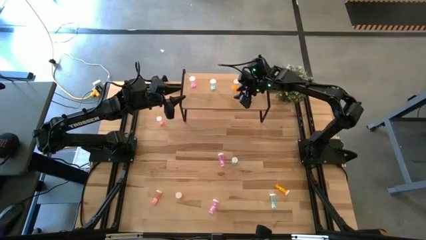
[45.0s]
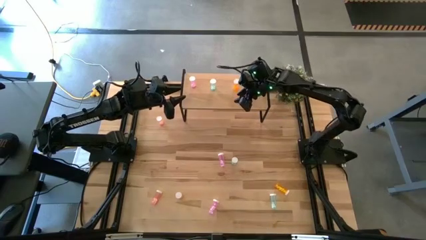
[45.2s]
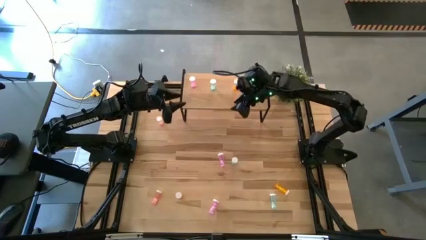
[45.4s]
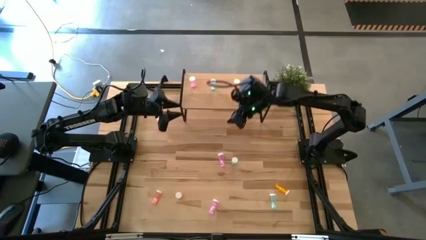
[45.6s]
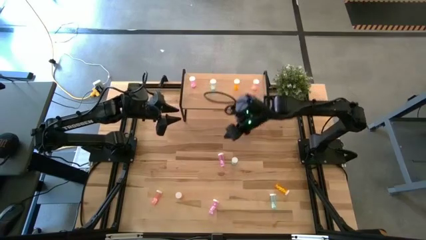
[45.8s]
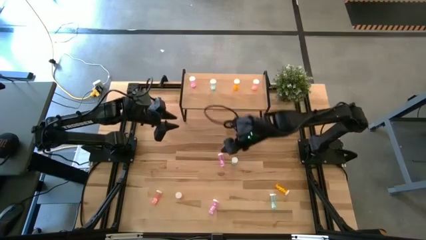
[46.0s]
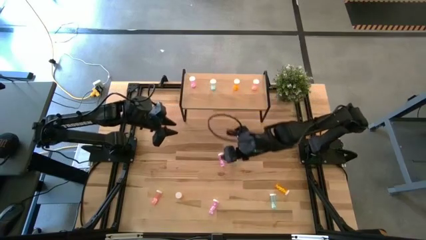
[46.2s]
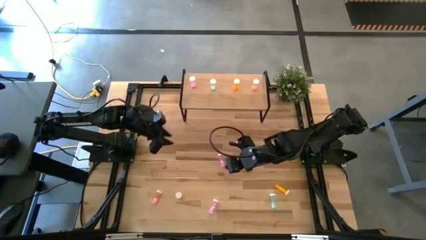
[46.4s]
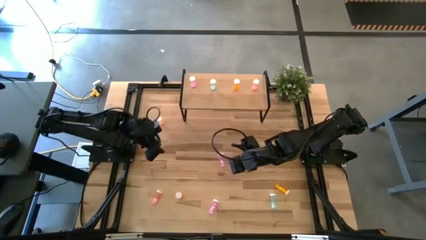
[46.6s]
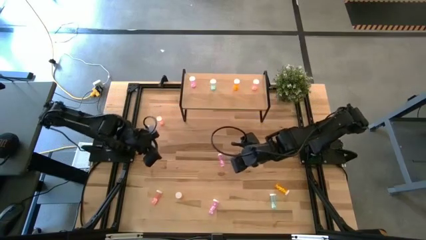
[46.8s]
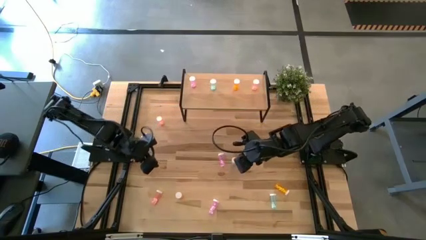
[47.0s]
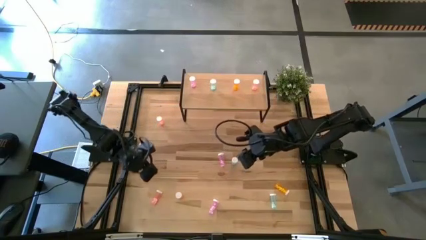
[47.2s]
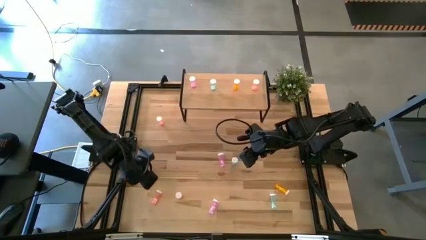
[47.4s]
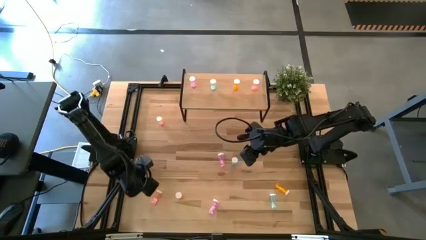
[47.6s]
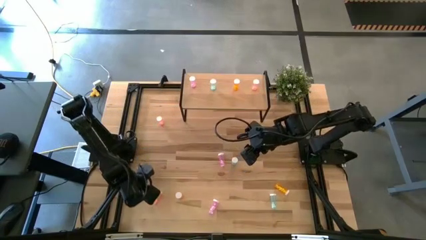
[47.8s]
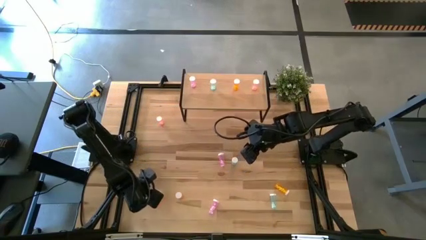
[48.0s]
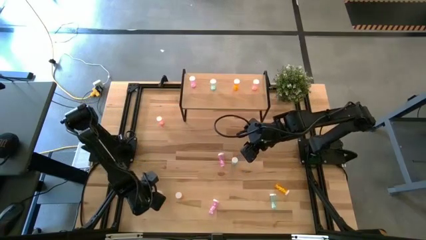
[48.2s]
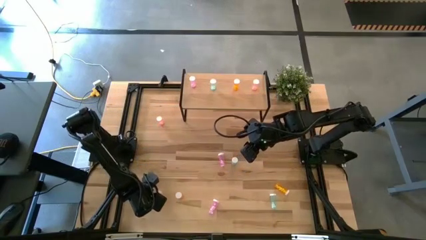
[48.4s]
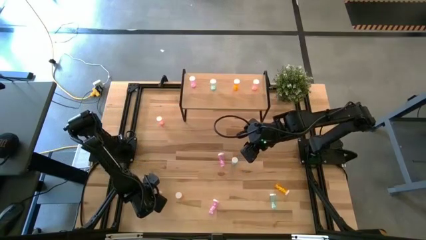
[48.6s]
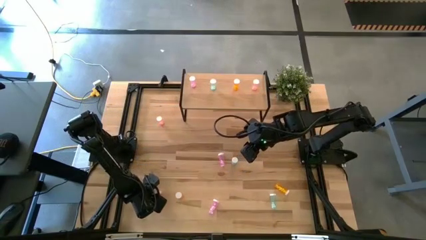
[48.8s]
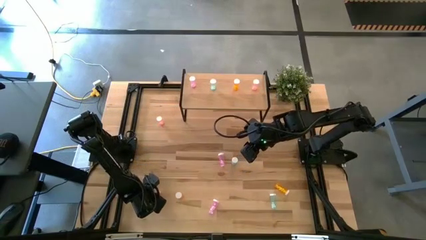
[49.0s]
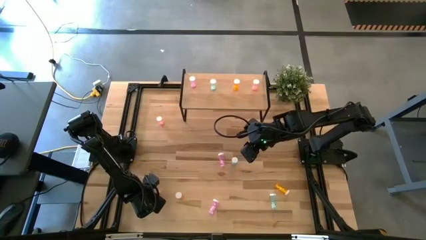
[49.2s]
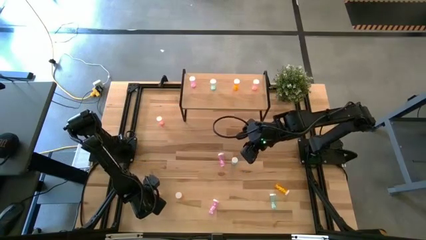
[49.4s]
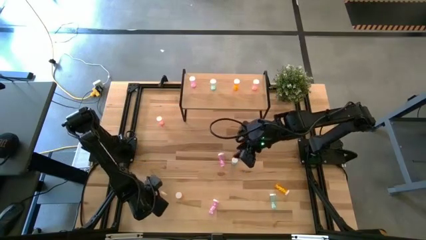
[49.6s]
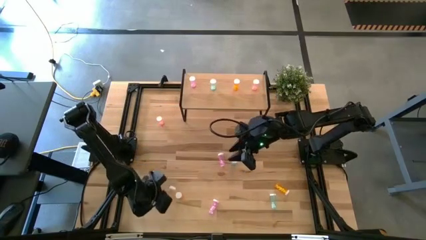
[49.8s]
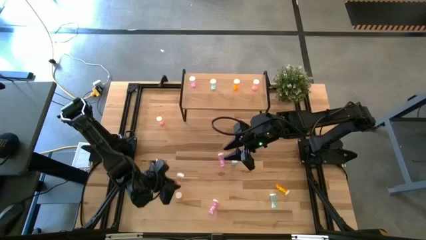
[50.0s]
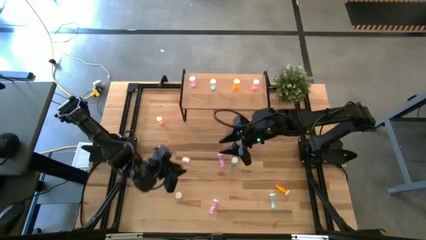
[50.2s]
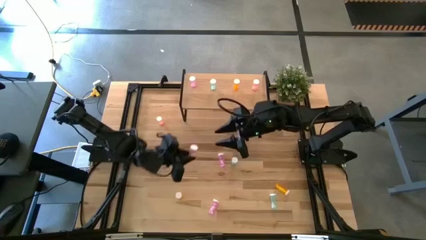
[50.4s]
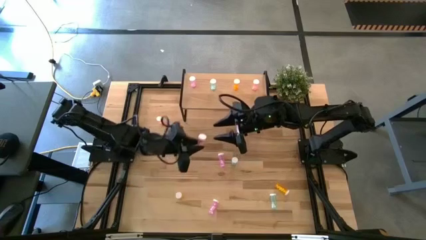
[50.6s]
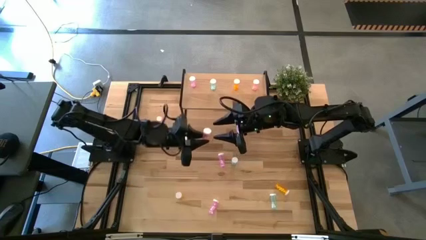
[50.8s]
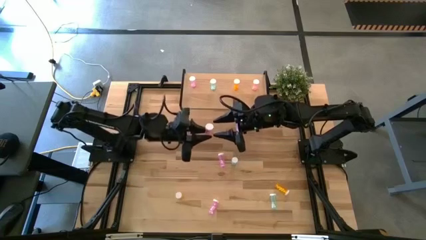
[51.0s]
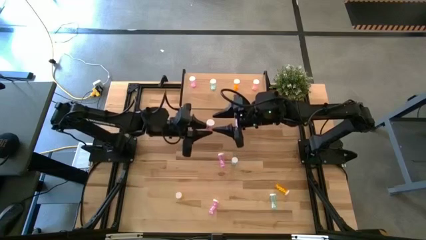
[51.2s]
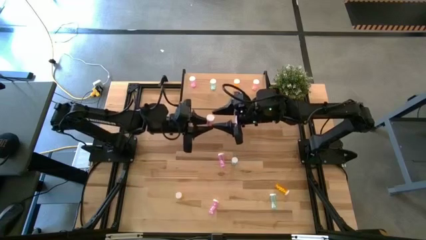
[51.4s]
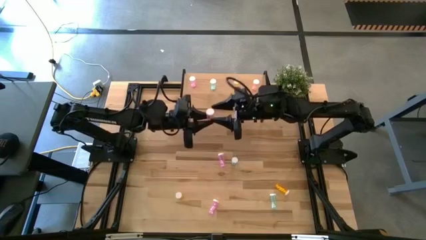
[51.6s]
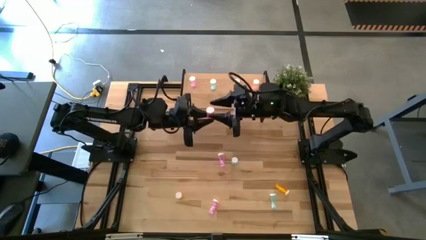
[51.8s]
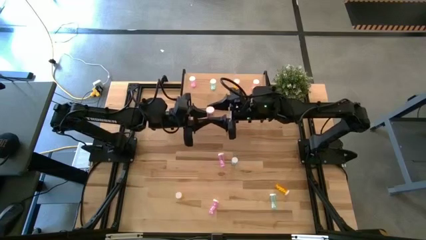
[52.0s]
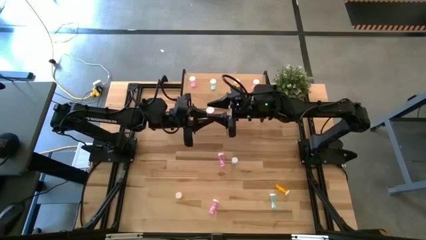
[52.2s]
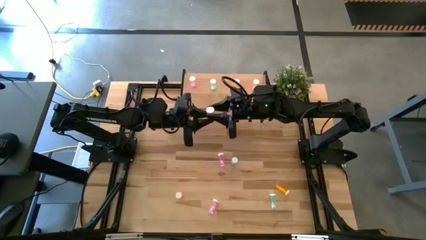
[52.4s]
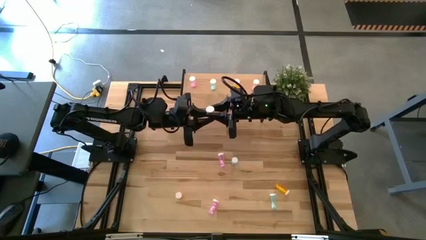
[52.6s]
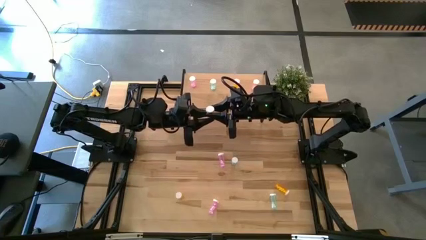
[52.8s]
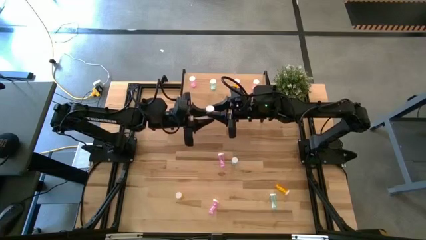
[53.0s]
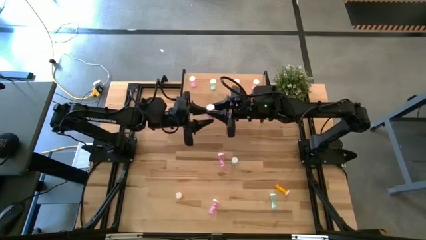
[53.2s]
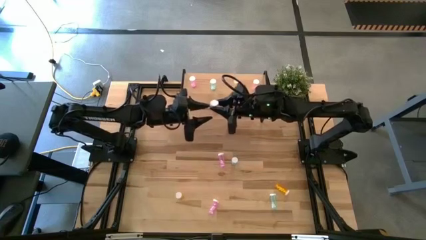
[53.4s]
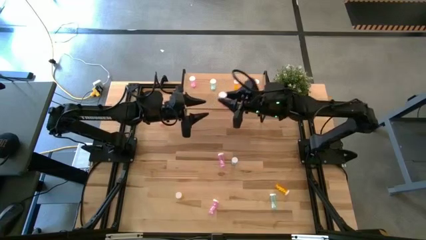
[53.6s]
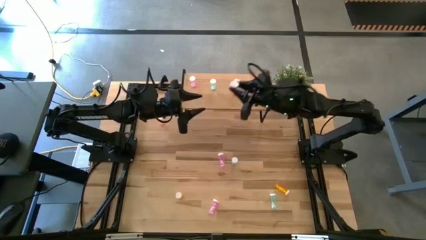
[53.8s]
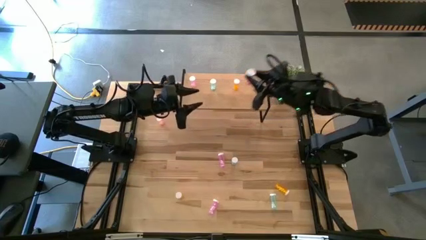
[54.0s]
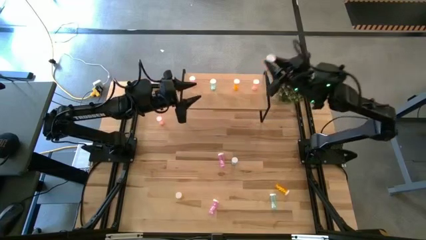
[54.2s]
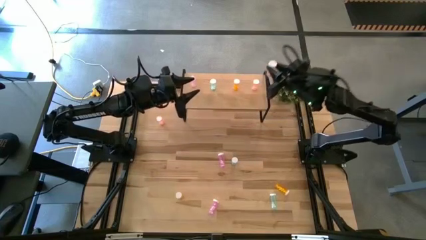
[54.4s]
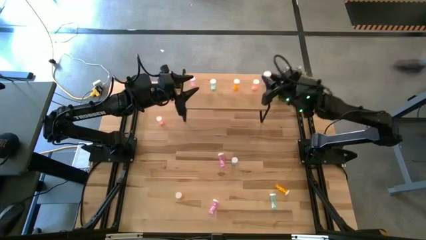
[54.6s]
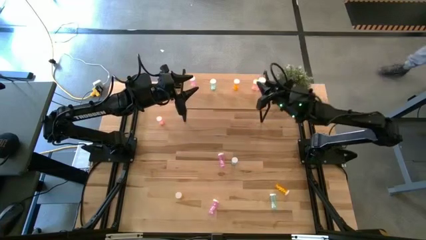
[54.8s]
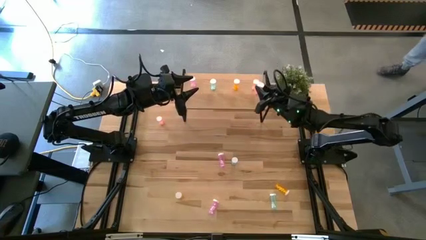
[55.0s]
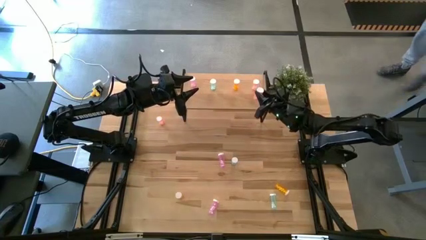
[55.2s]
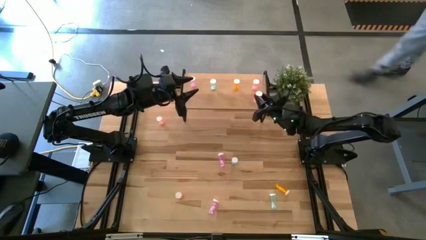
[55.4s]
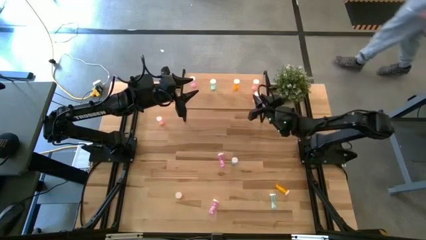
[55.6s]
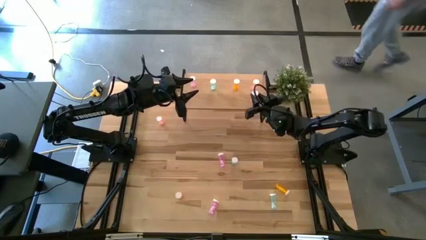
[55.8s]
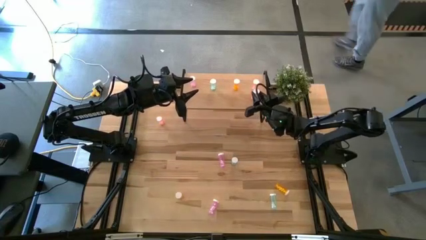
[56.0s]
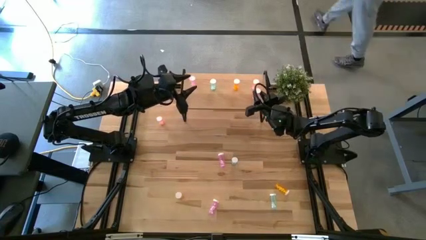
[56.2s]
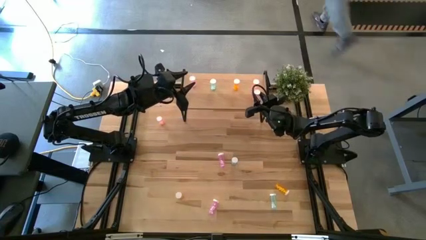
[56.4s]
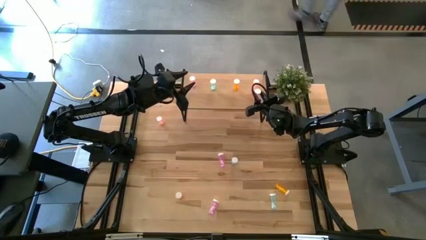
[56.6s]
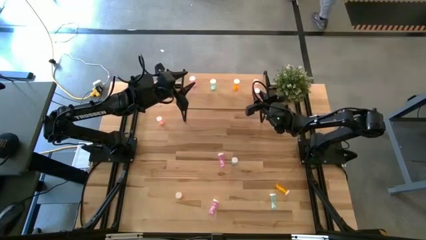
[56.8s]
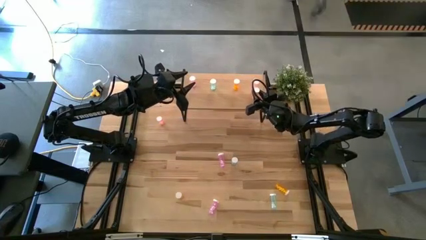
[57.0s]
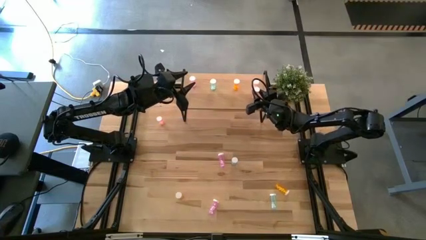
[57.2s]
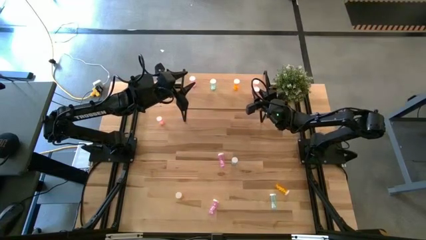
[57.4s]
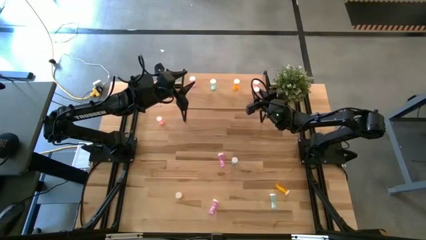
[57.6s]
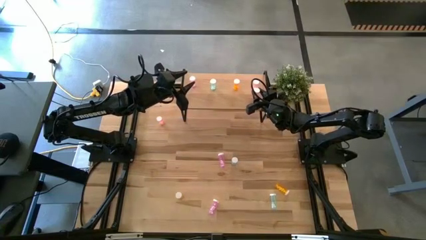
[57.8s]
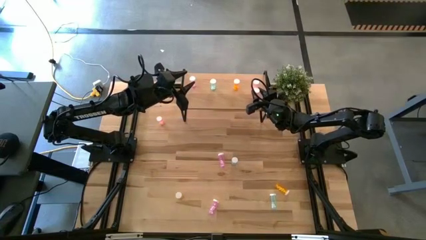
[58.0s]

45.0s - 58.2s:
Task: Pick and place medicine bottles onto shelf by color
Put the bottom pink pill bottle on the shelf aligned with the other pink bottle
